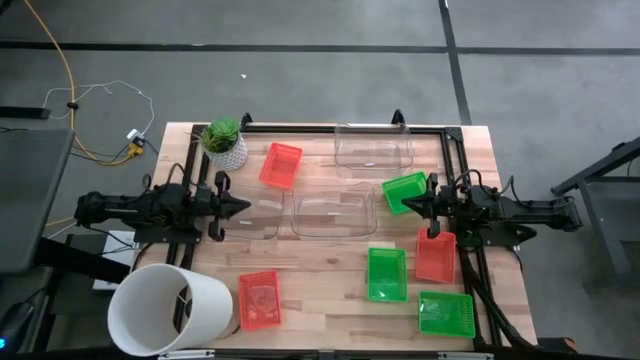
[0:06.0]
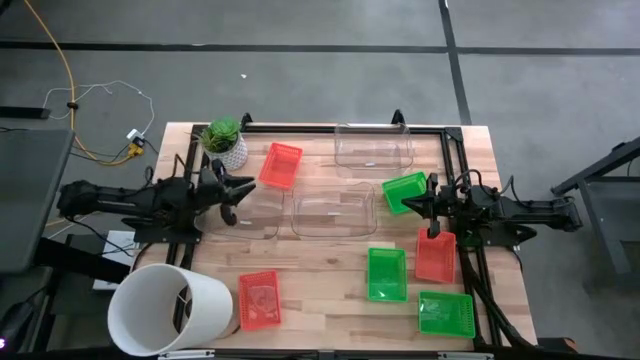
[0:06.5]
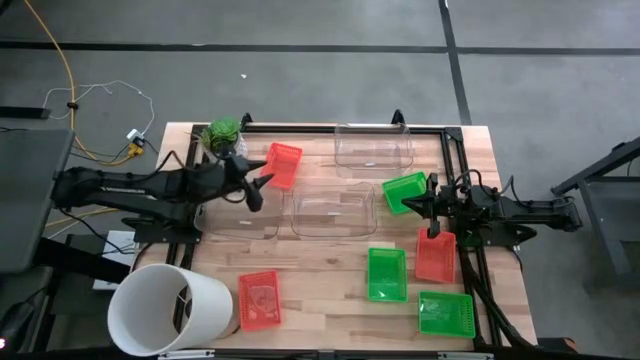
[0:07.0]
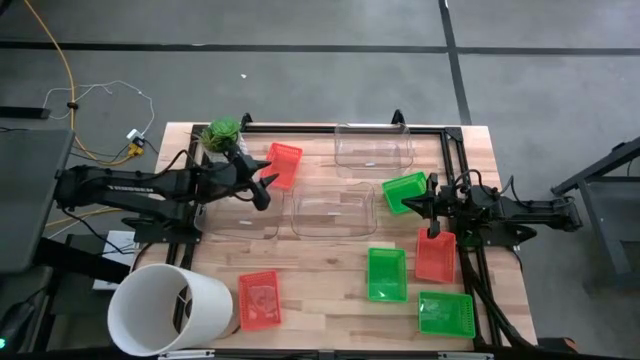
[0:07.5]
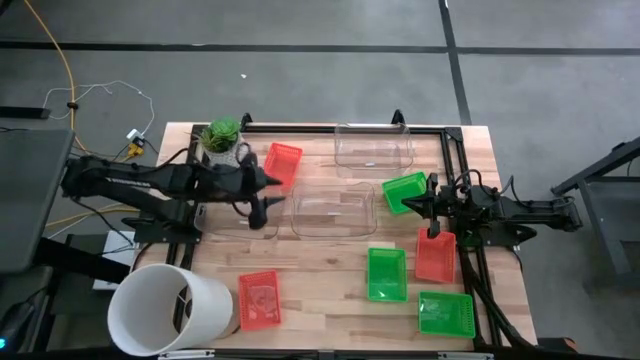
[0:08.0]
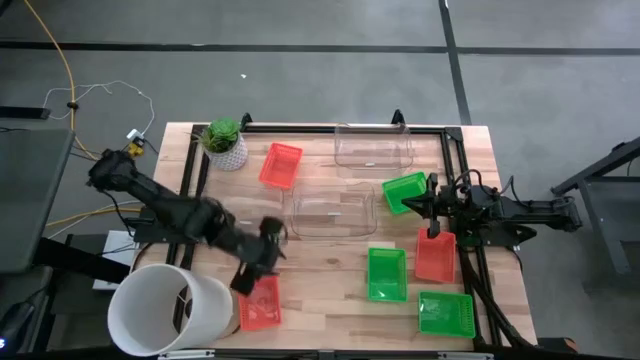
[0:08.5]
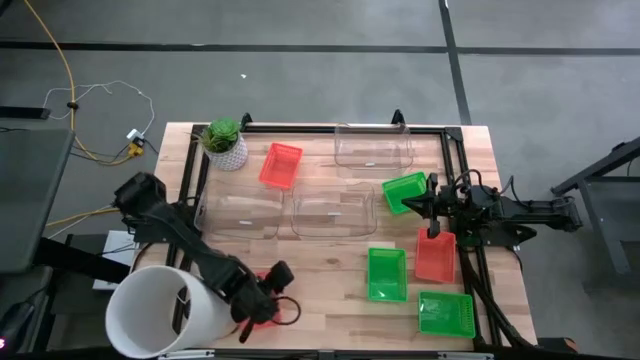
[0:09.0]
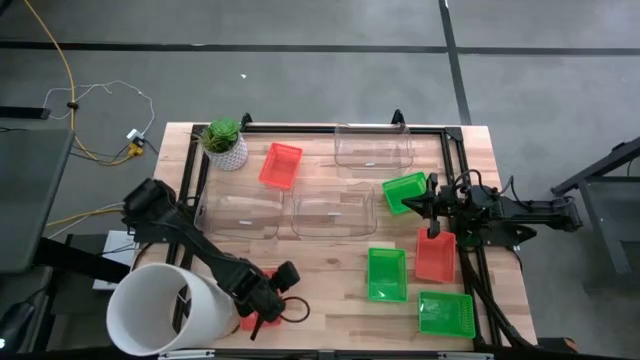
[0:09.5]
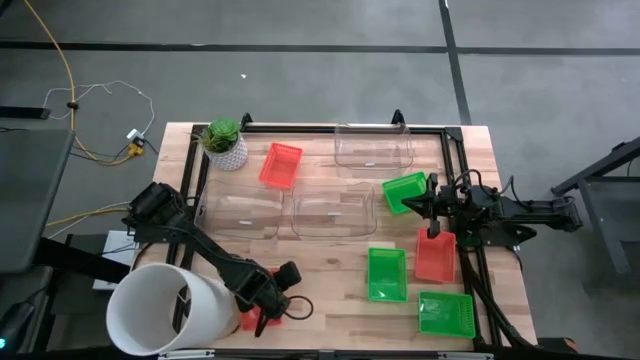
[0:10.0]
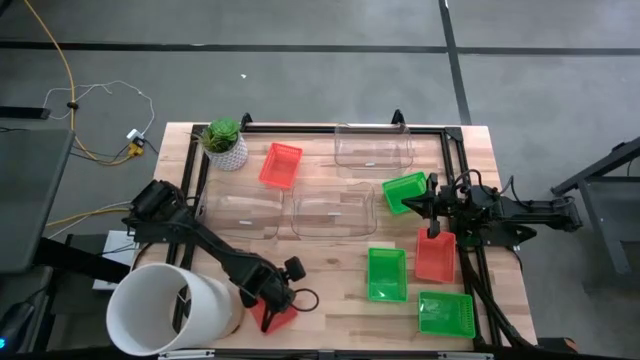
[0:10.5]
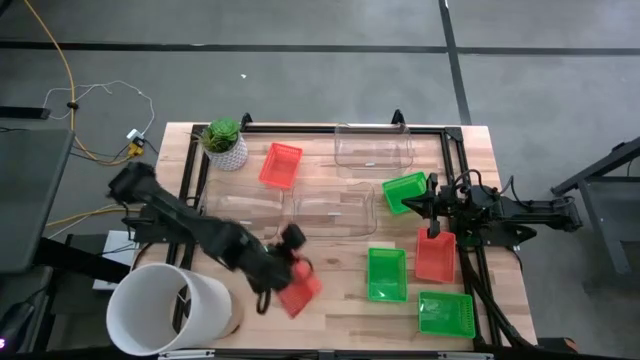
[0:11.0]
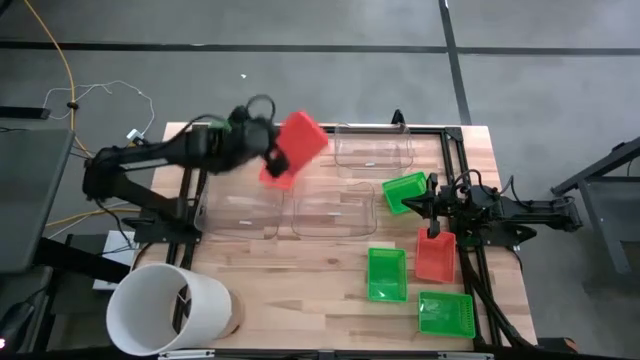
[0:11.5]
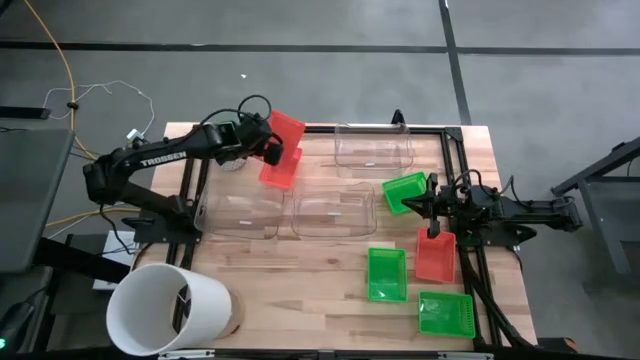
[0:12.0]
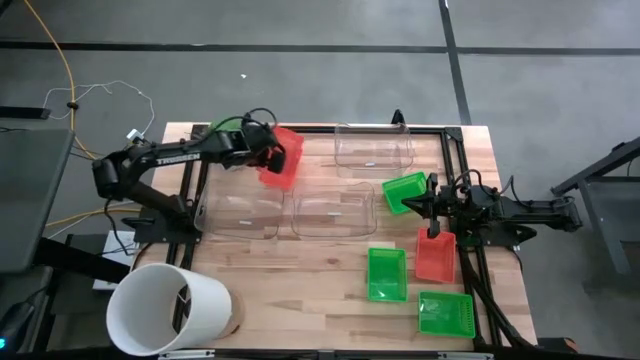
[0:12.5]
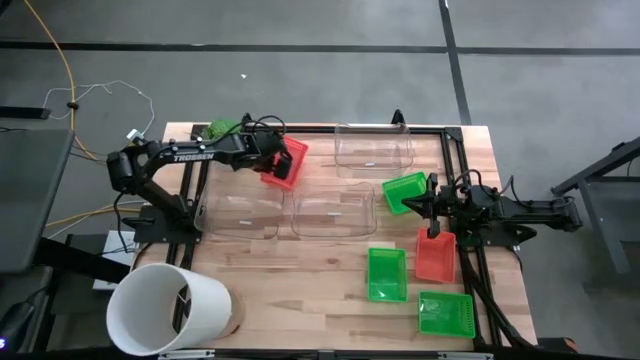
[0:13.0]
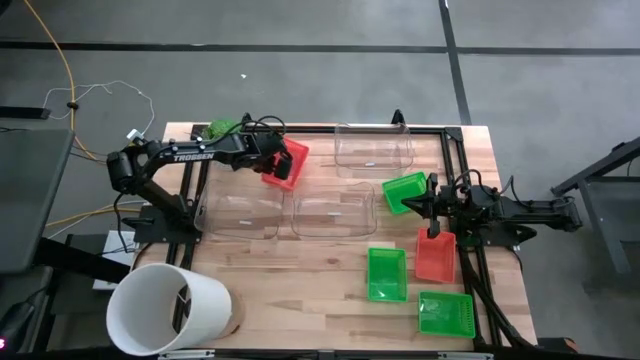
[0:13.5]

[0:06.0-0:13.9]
Stack the bottom orange bin on the top orange bin

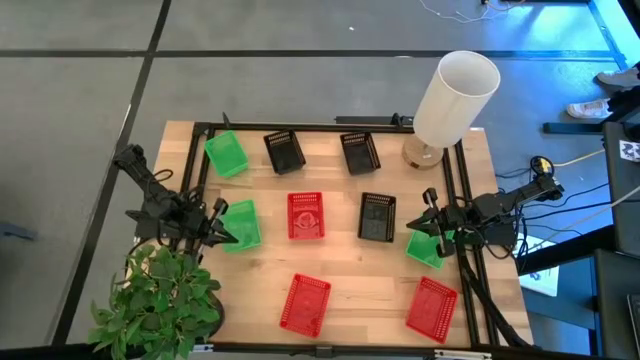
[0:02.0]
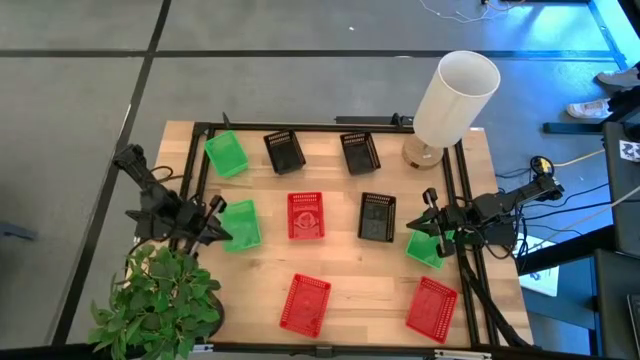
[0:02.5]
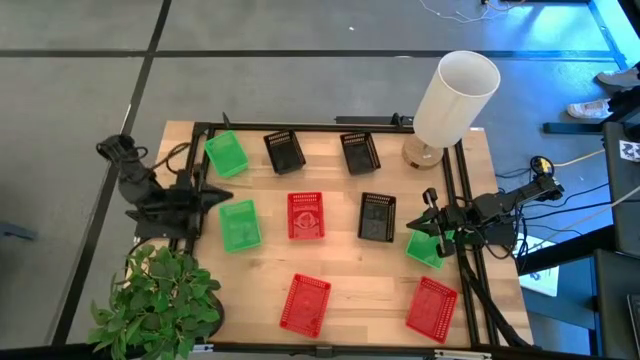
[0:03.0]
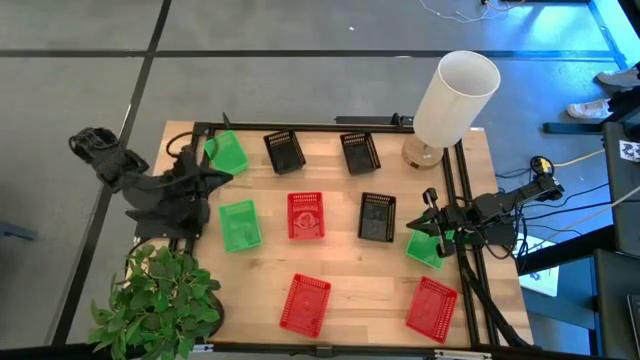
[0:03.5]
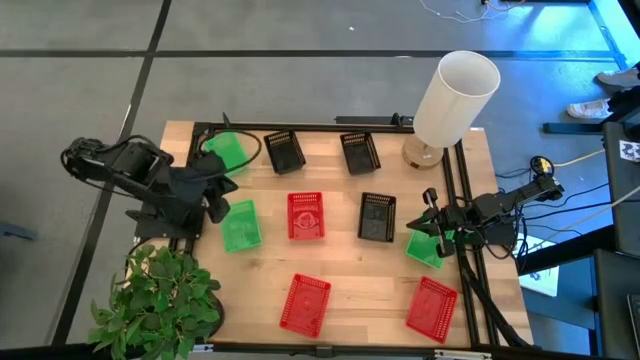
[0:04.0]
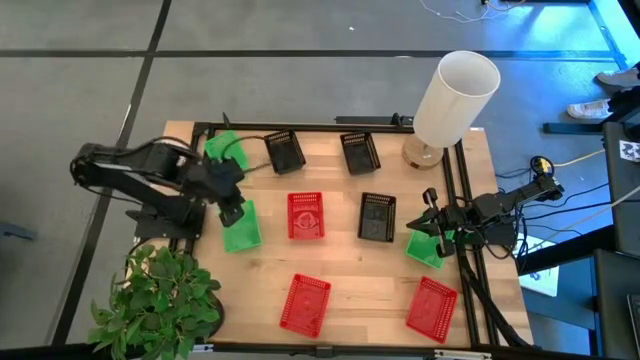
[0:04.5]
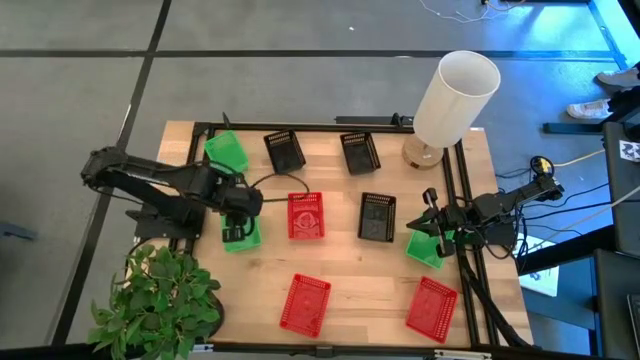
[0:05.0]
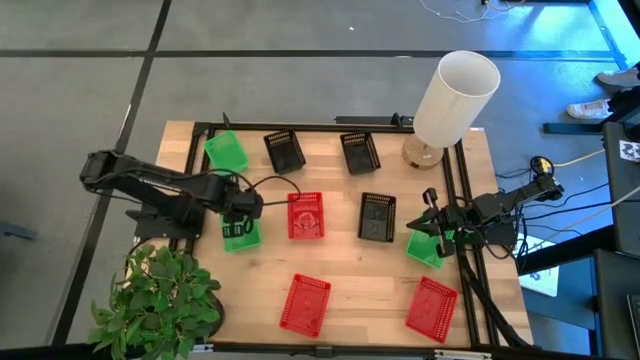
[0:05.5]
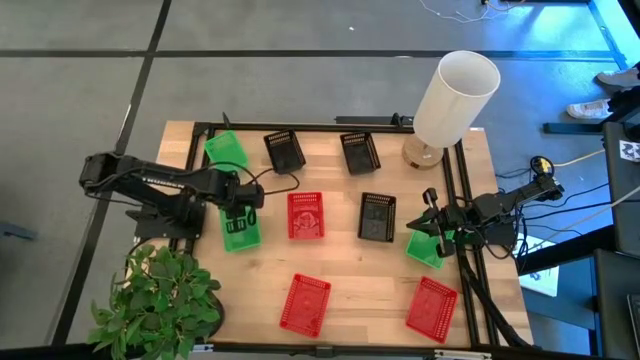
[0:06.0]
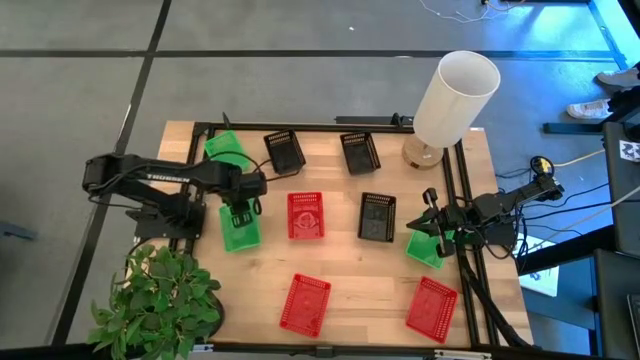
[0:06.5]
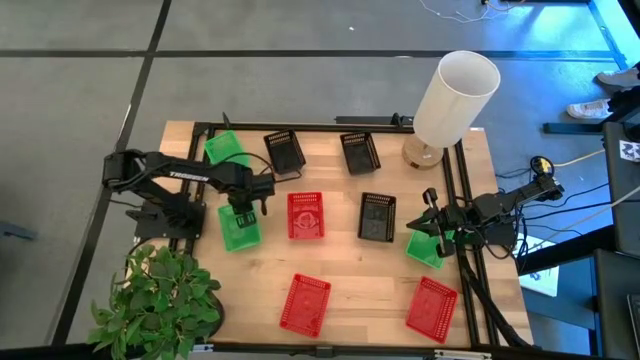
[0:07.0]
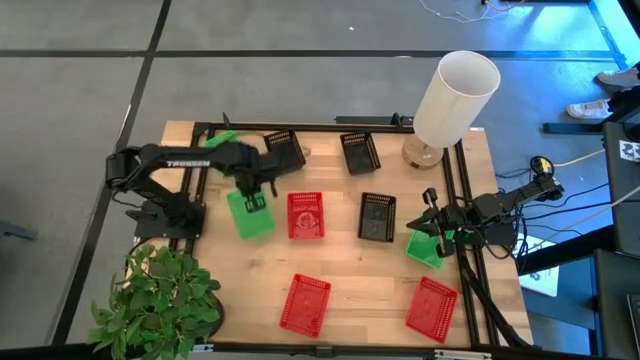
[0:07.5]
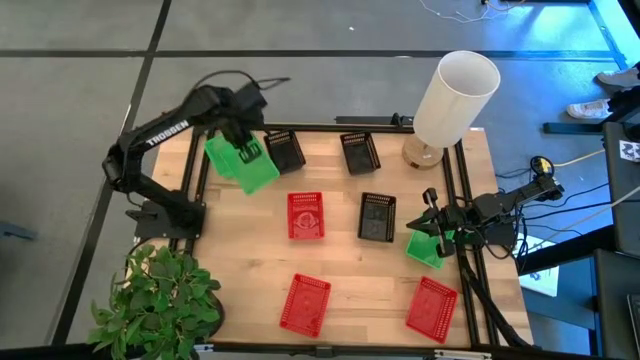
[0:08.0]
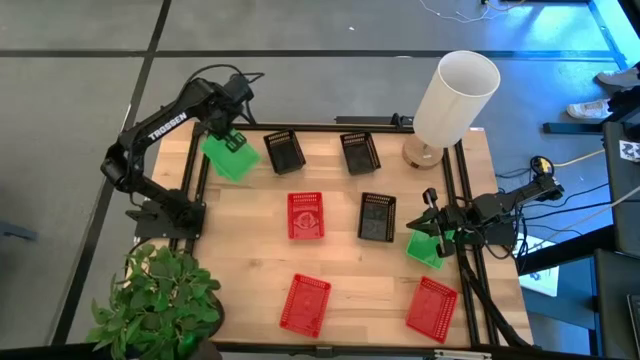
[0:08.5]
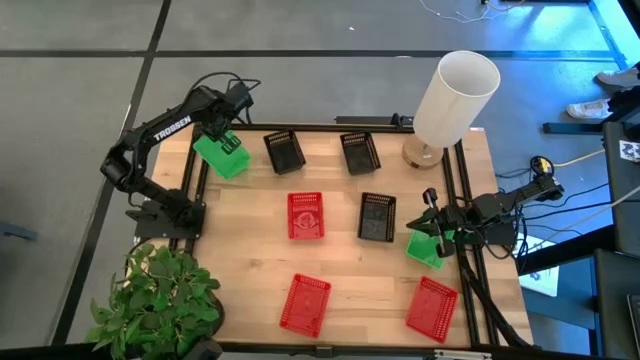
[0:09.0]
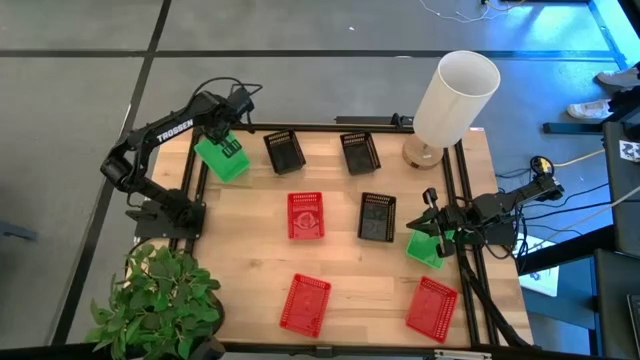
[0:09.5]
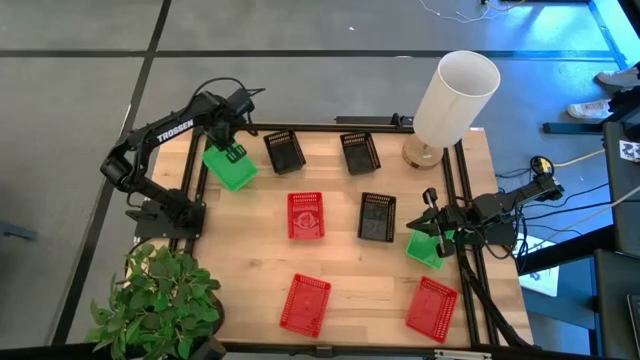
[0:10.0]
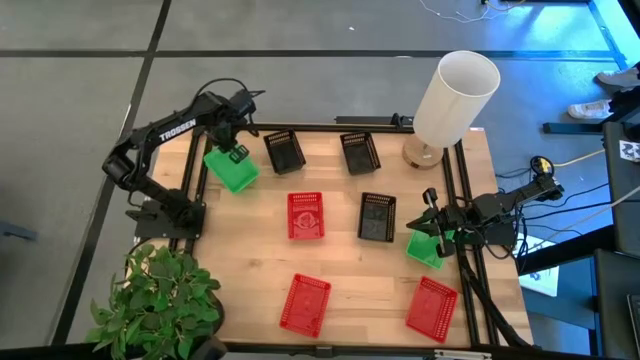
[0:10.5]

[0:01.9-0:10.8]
Stack the bottom left green bin on the top green bin
